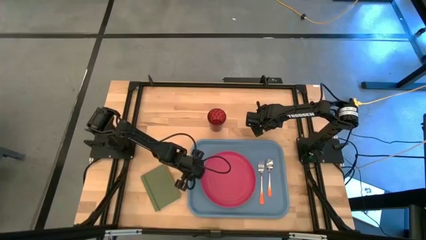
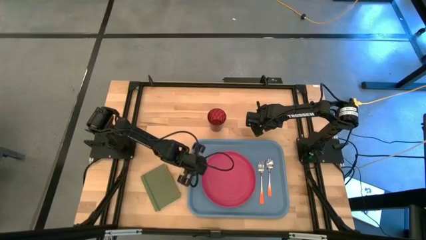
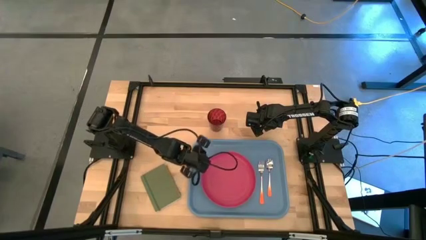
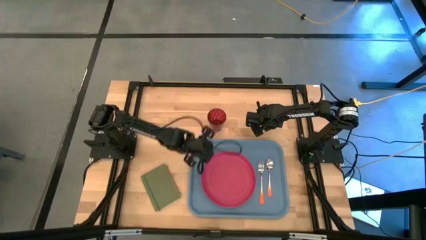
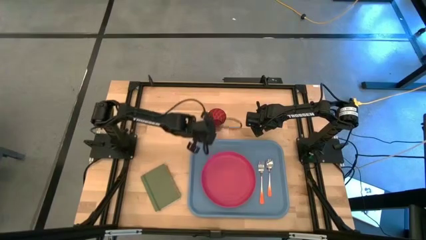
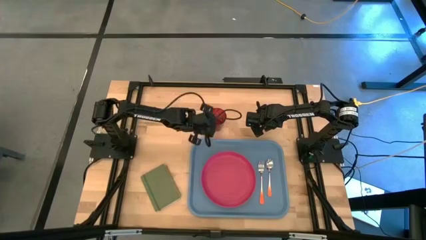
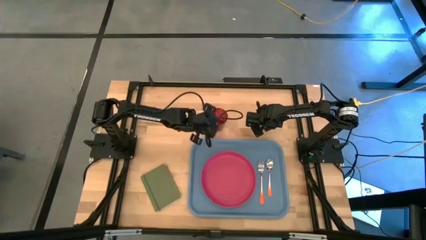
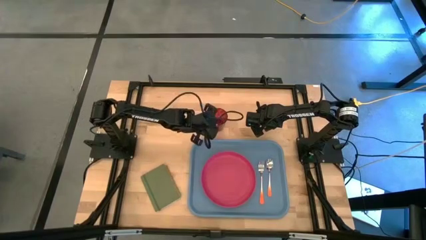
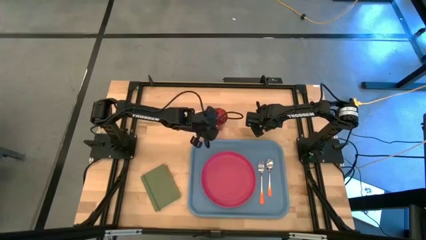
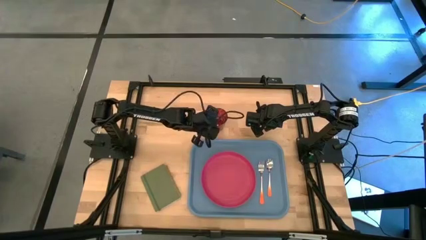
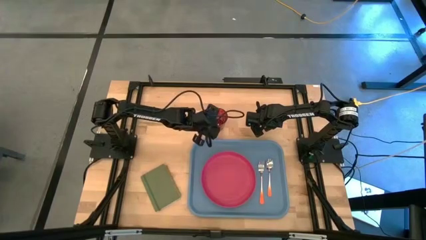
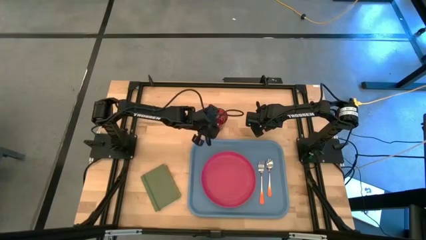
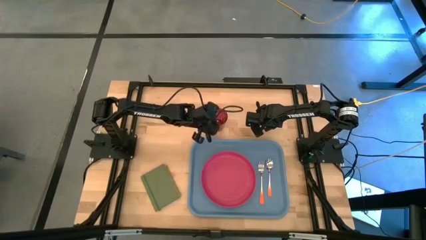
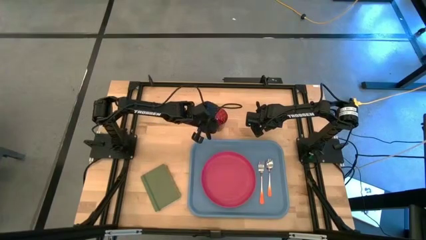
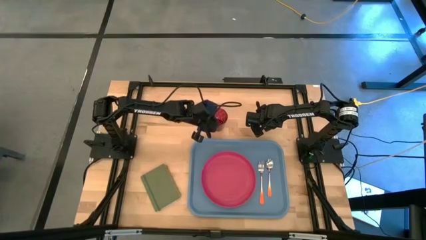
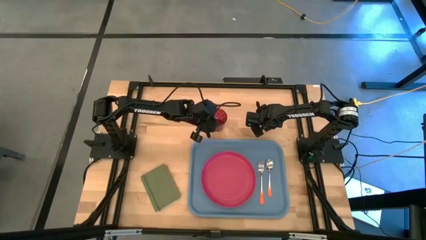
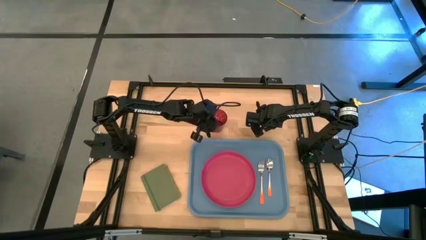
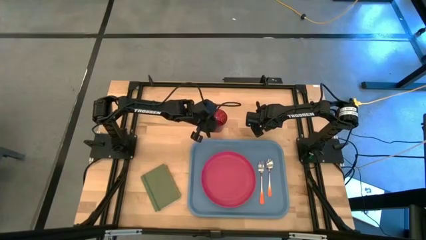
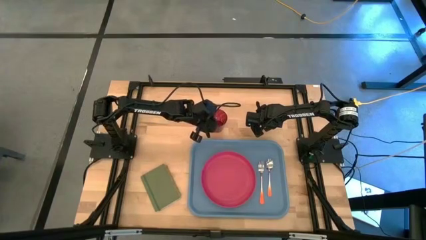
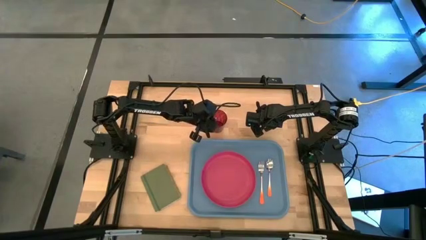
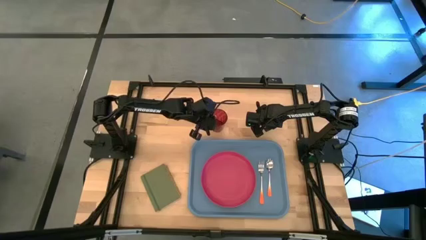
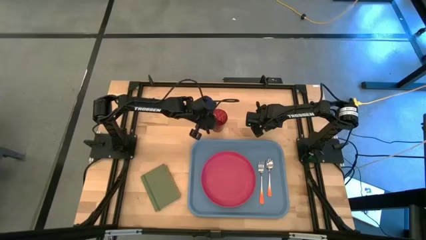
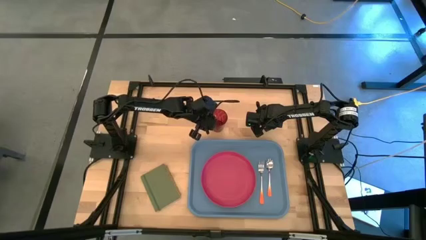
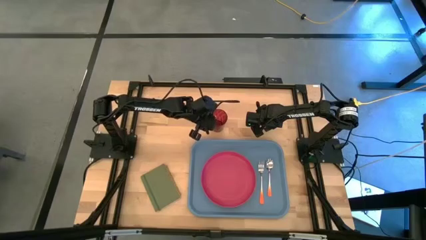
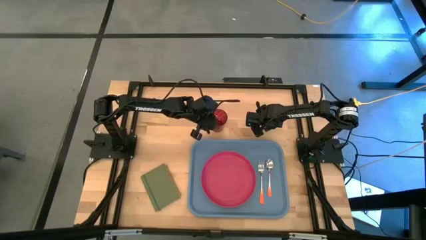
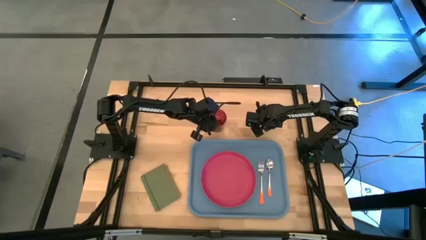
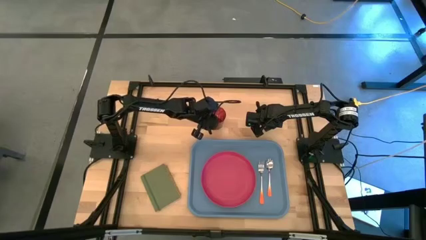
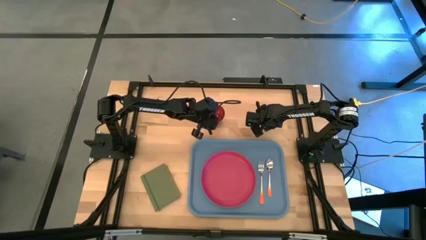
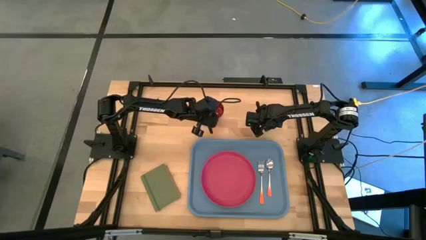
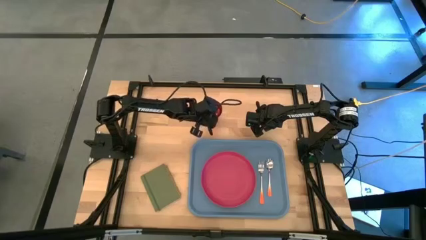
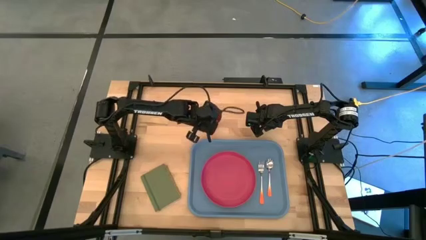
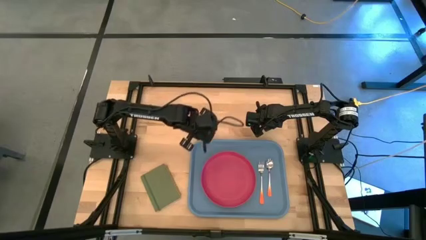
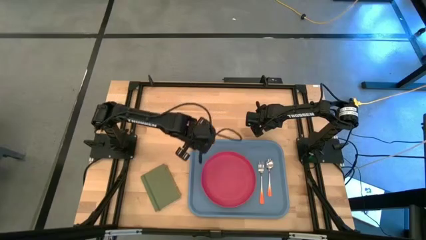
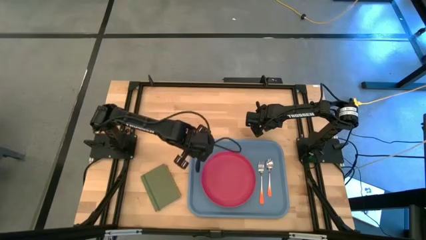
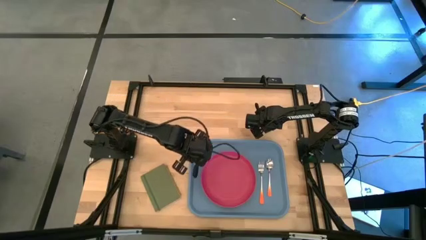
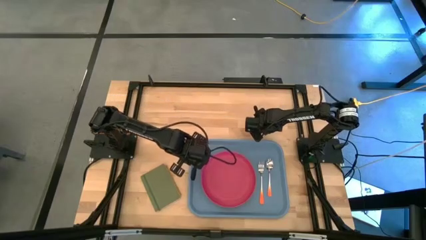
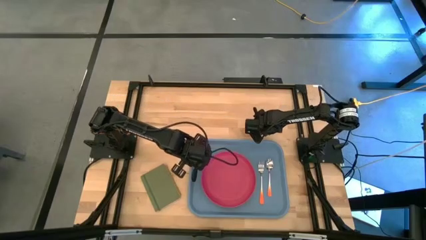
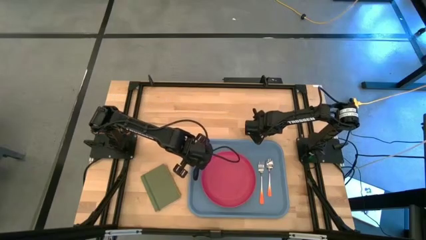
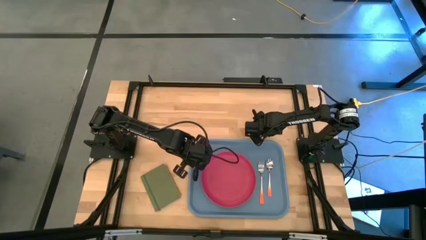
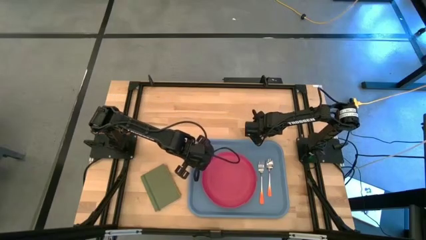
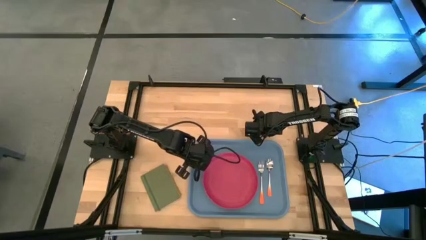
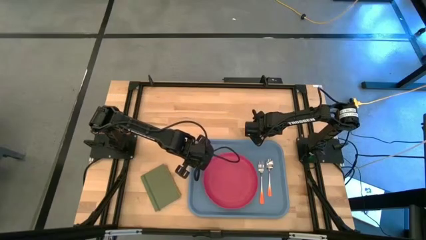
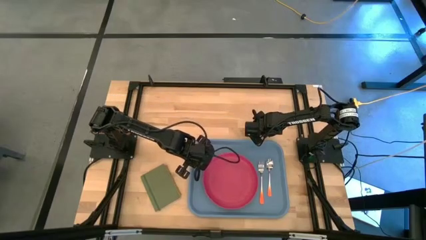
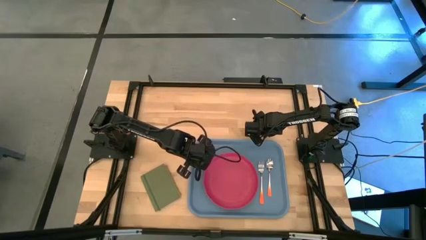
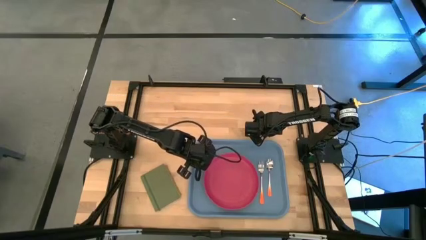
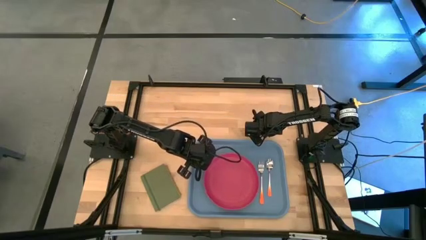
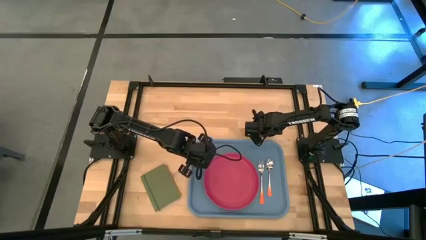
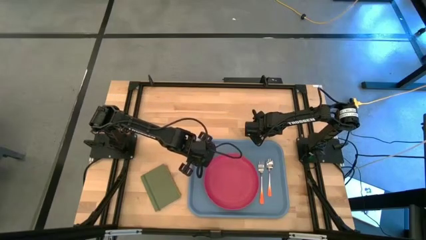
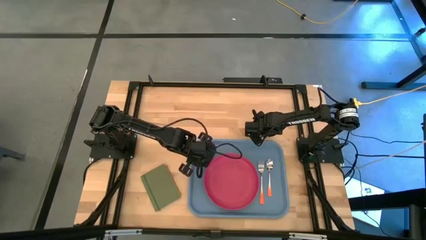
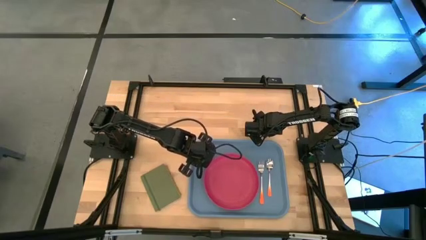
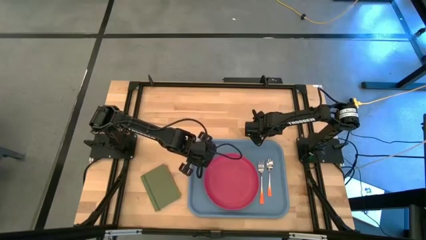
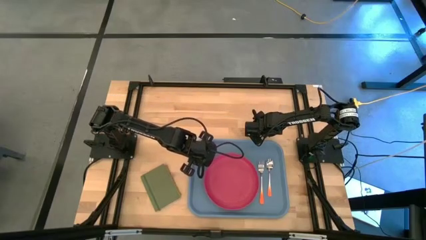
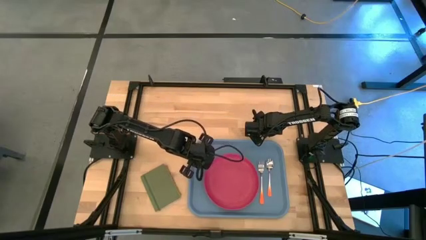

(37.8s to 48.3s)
Task: Pick and place plate/cup/fork/spoon on tray
Put the red glass on the blue serving tray to the top left of the pink plate

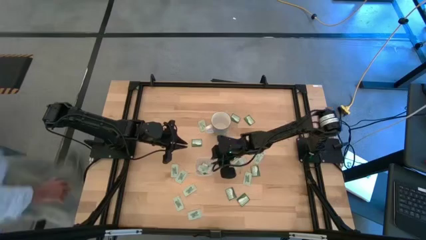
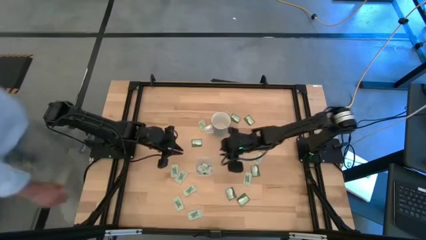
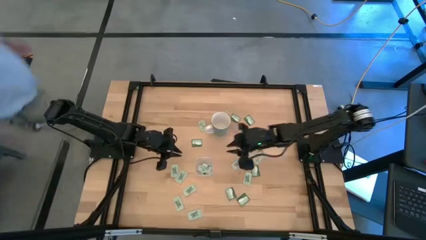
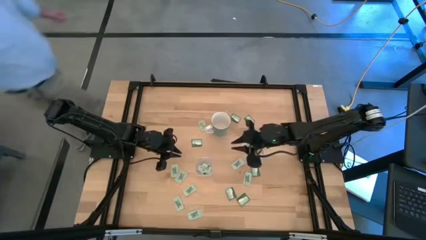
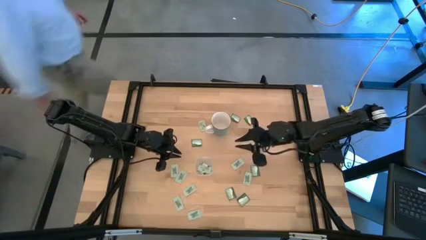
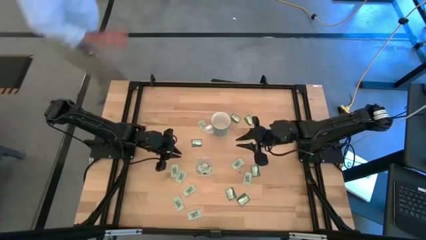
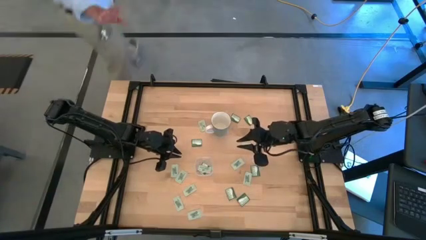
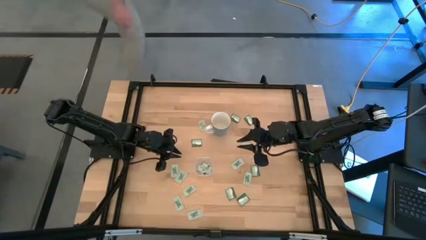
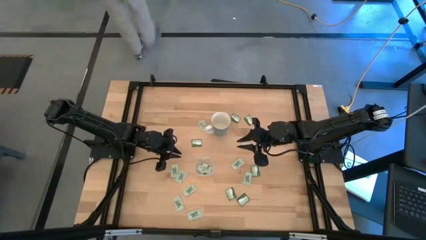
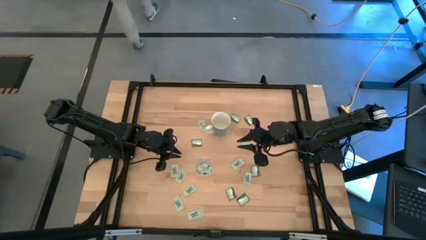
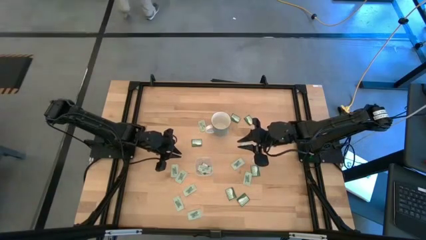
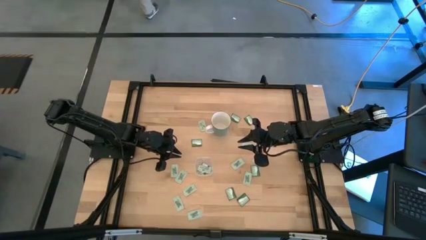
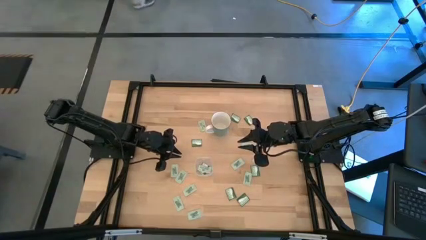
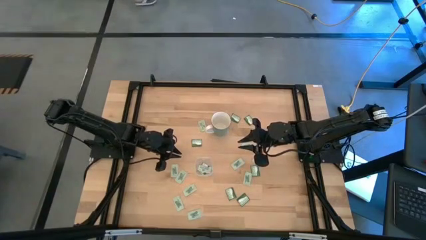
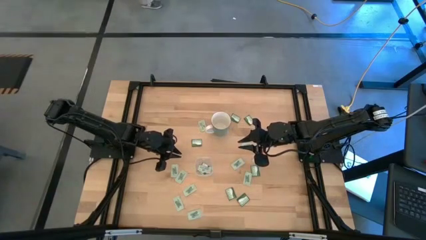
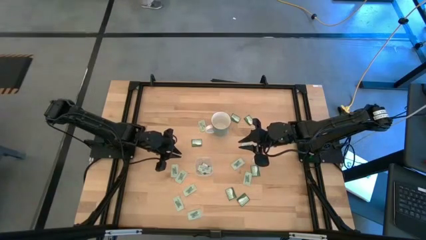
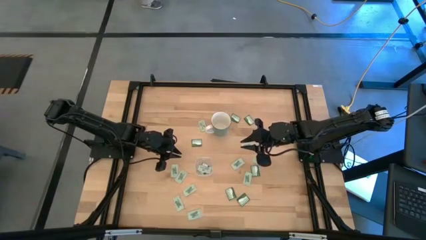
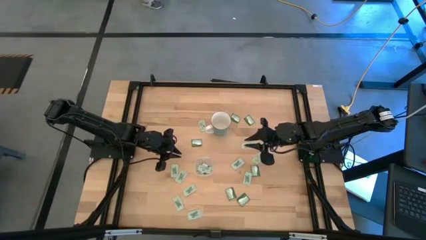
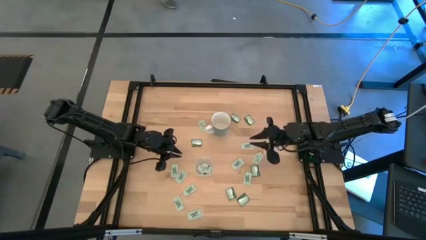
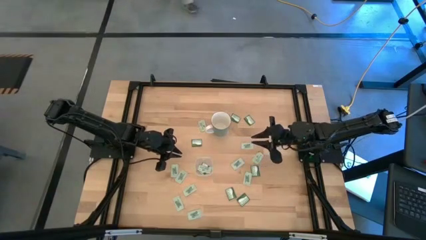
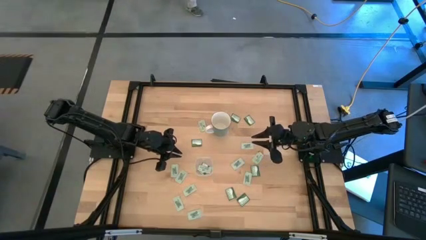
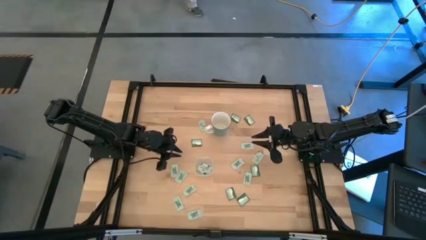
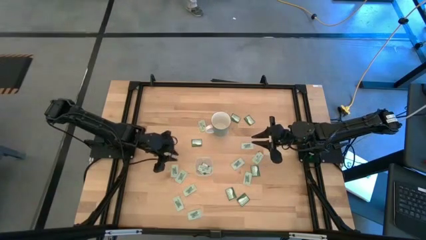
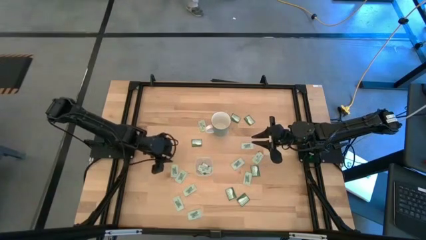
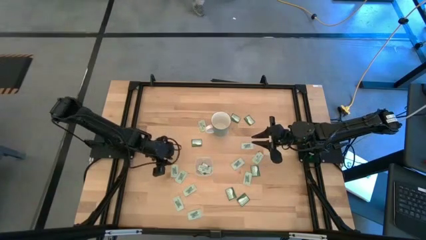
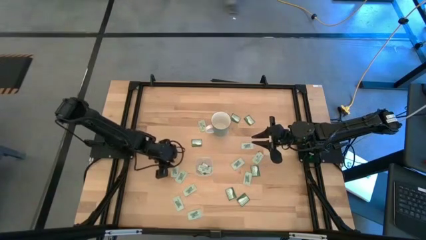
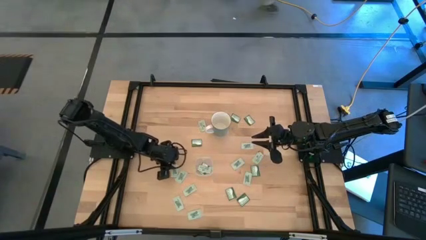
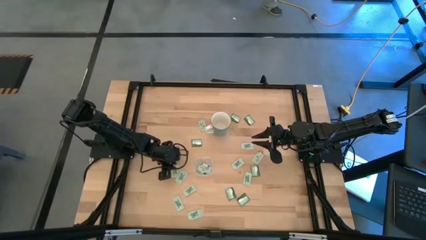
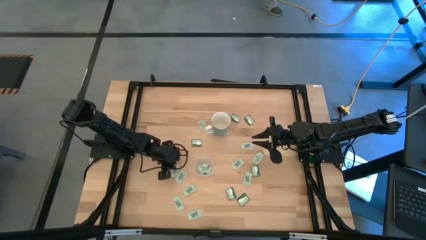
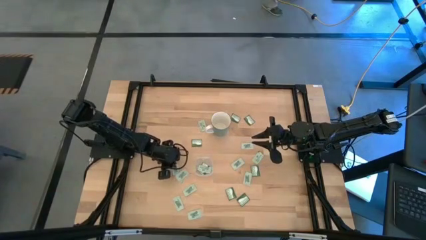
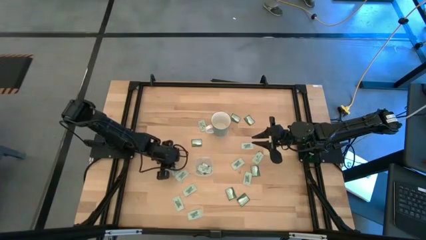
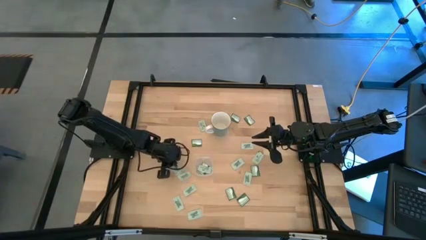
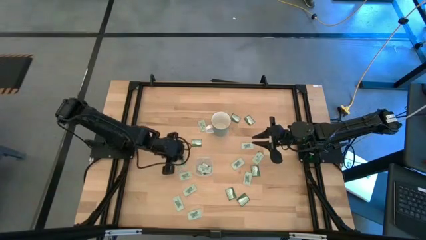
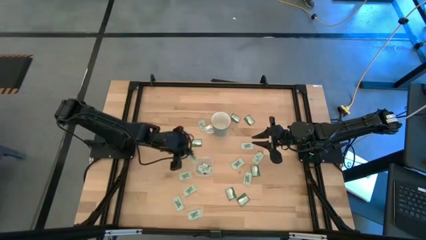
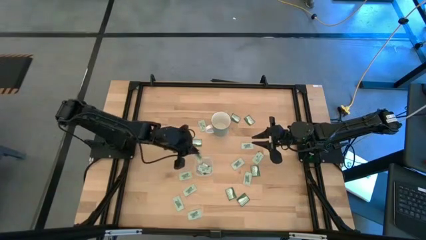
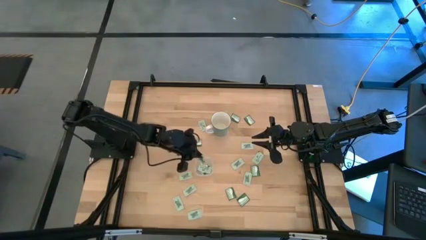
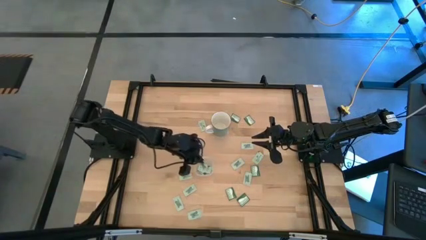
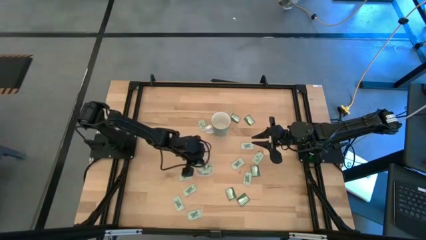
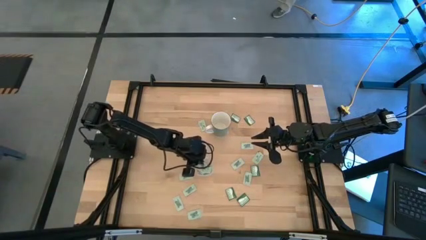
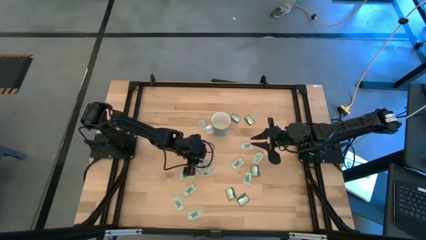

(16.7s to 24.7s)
Task: Pick and place Stevia / Truvia into bins
Put the white stevia packet into the transparent bin
